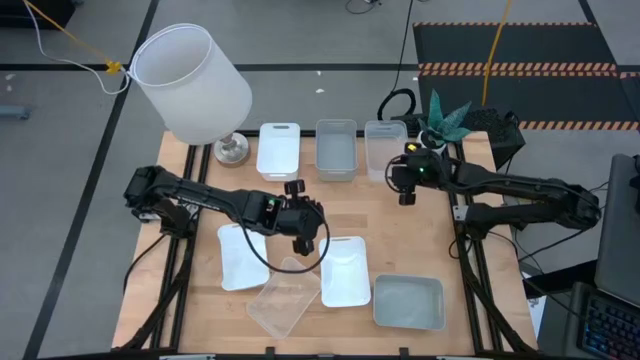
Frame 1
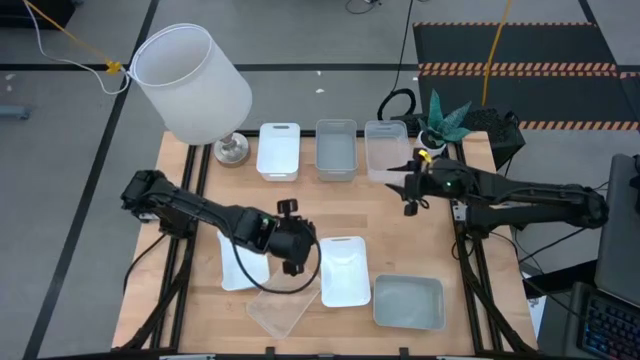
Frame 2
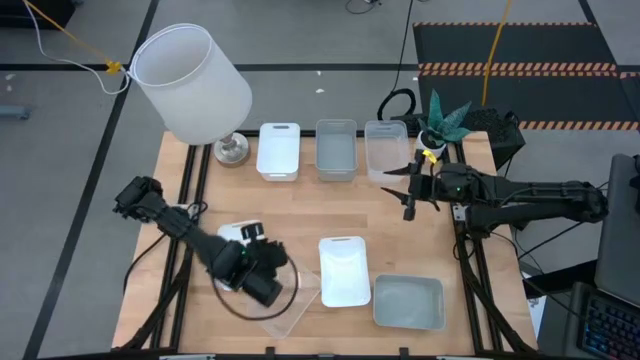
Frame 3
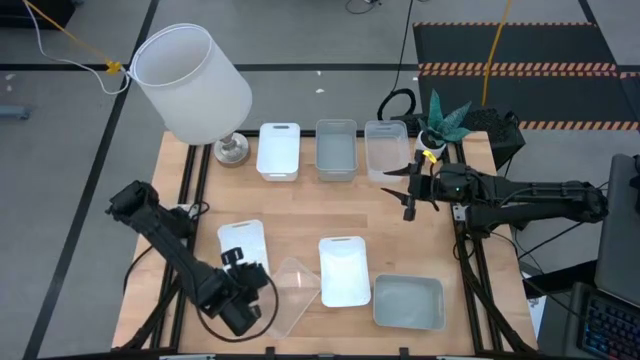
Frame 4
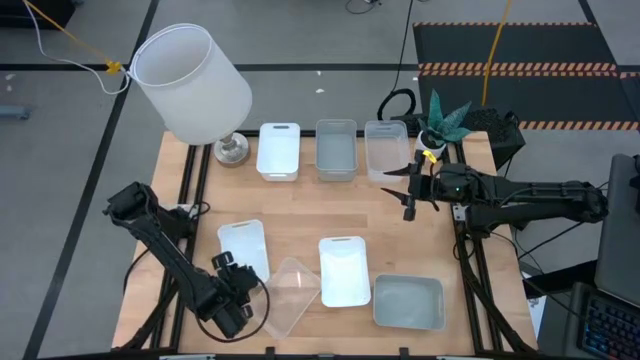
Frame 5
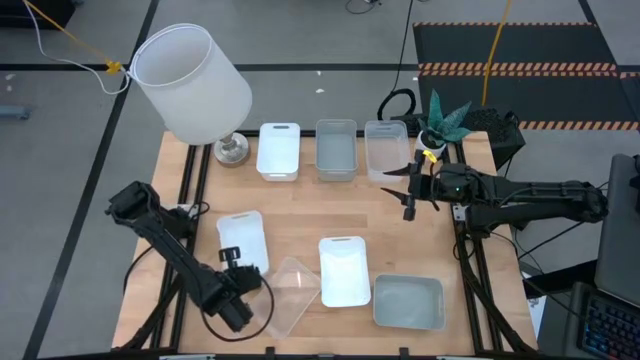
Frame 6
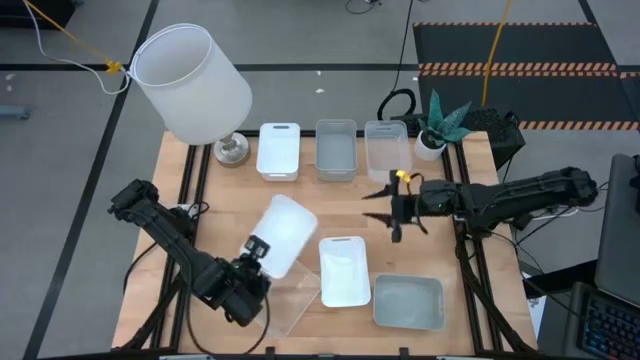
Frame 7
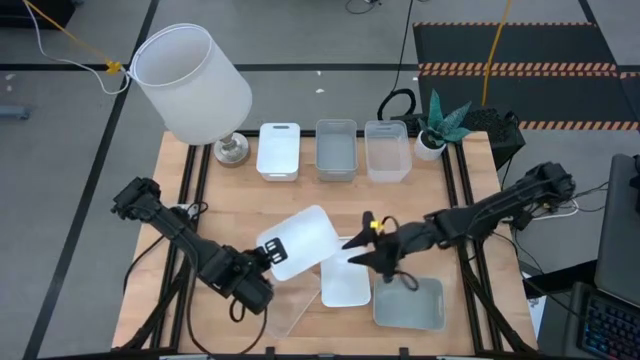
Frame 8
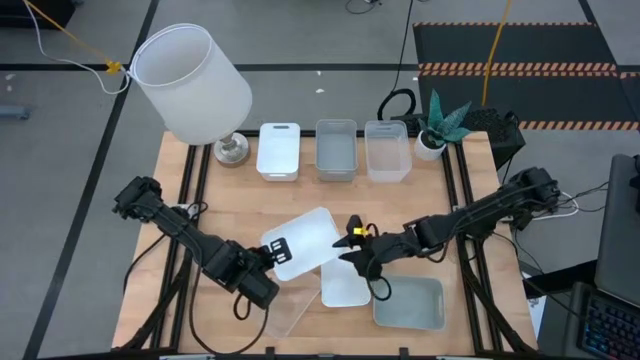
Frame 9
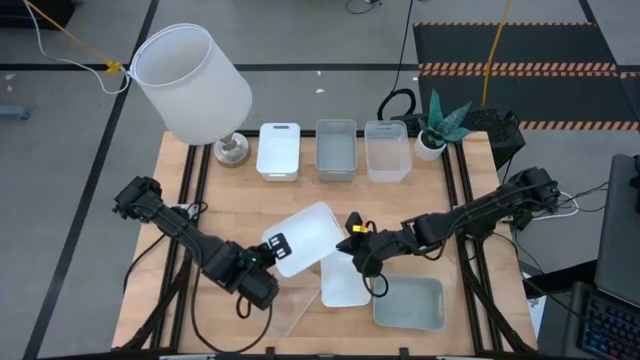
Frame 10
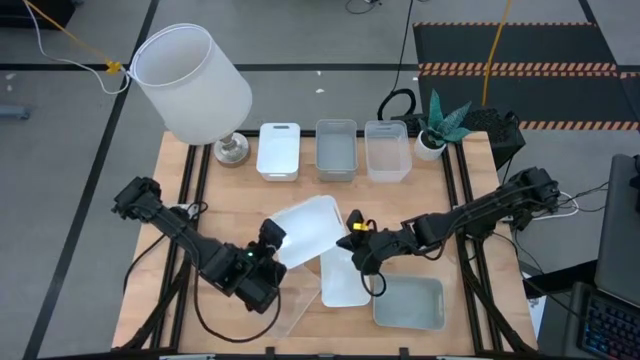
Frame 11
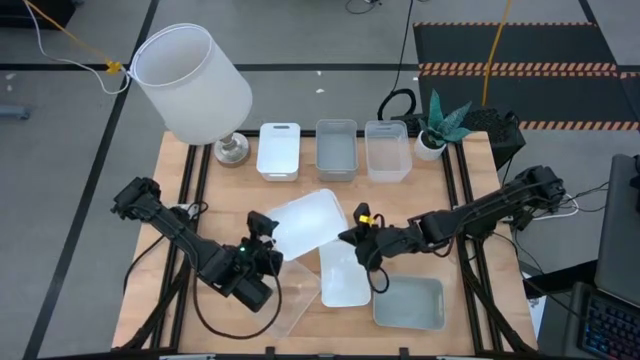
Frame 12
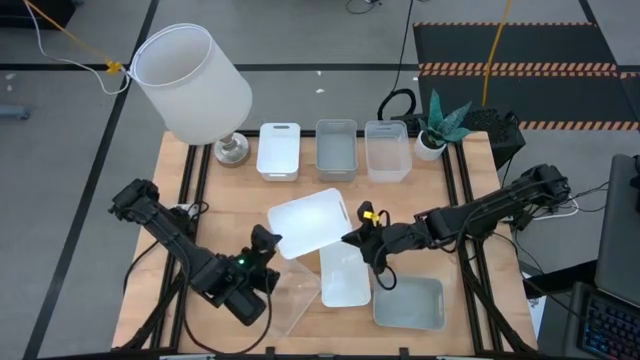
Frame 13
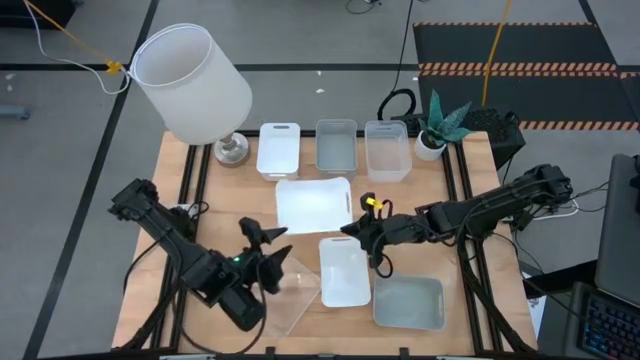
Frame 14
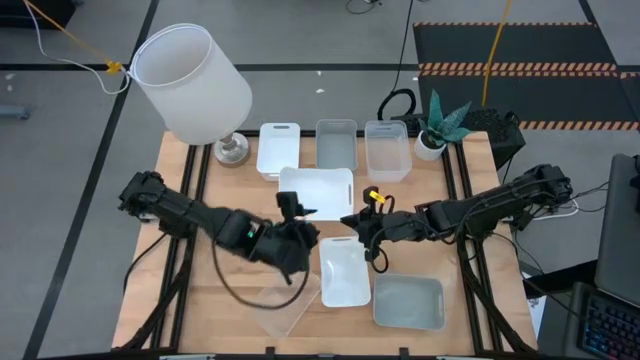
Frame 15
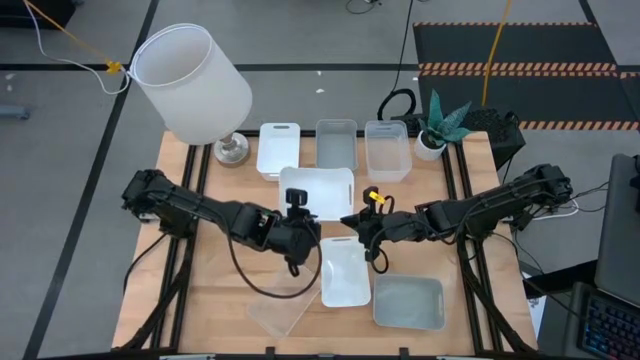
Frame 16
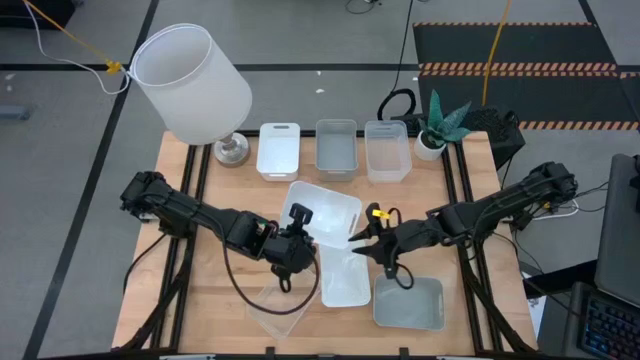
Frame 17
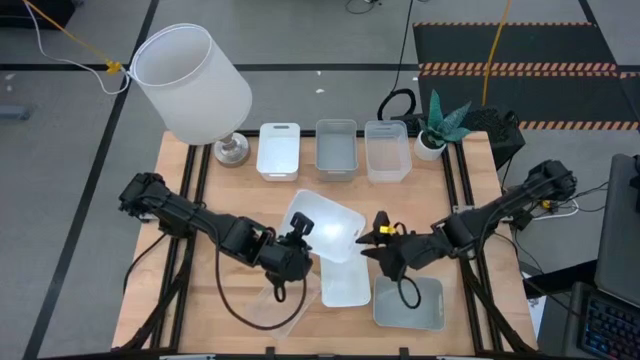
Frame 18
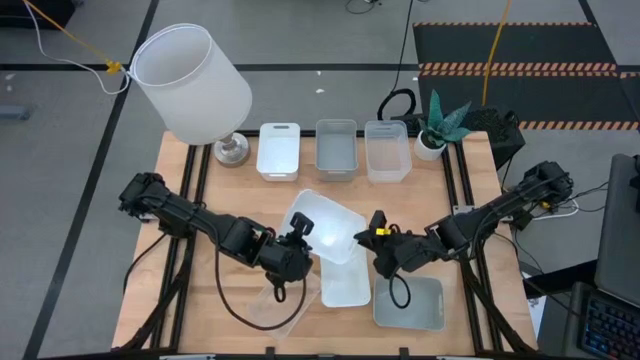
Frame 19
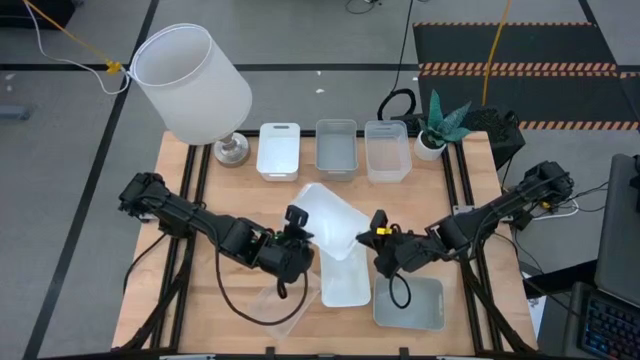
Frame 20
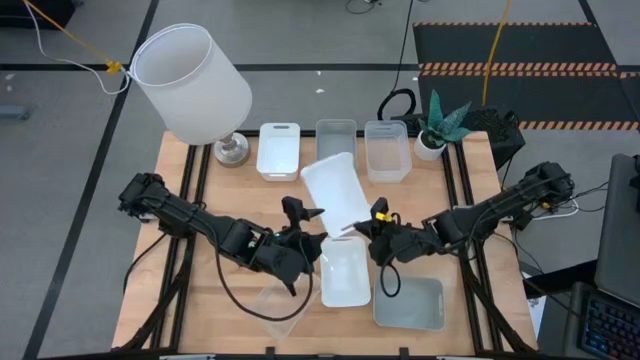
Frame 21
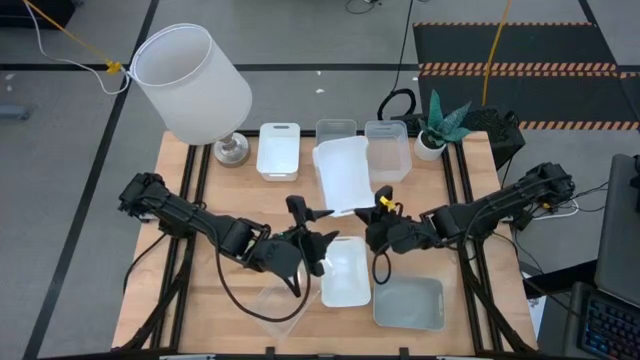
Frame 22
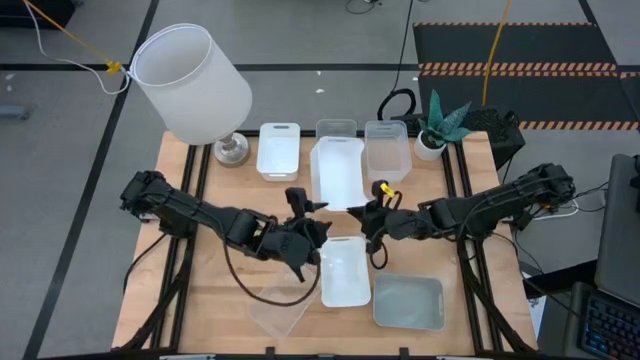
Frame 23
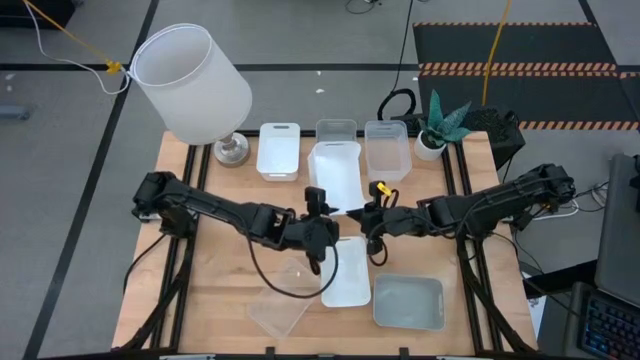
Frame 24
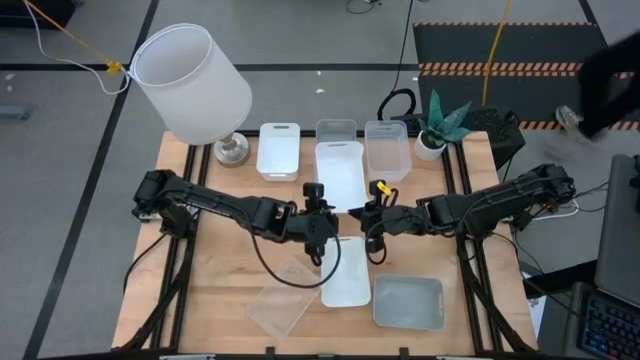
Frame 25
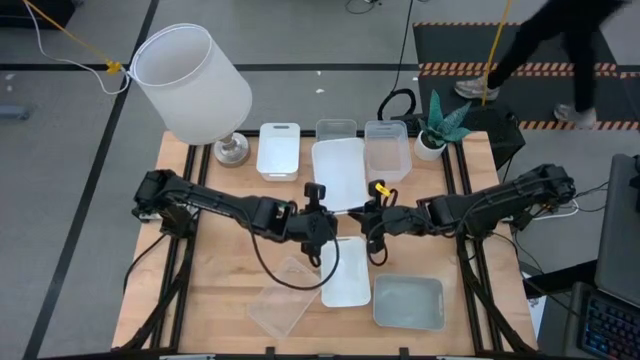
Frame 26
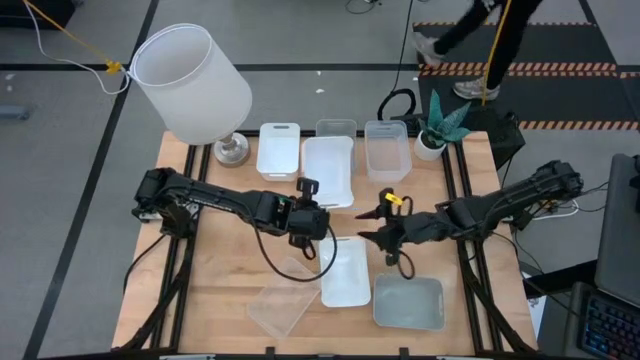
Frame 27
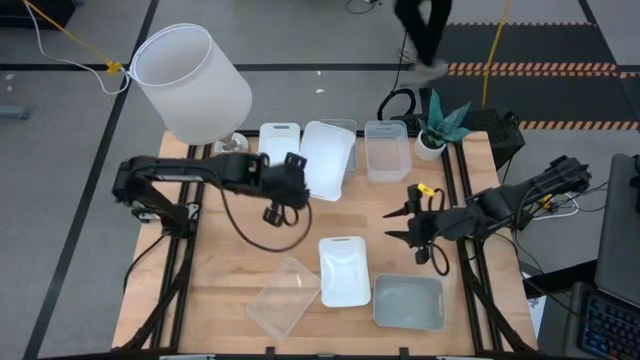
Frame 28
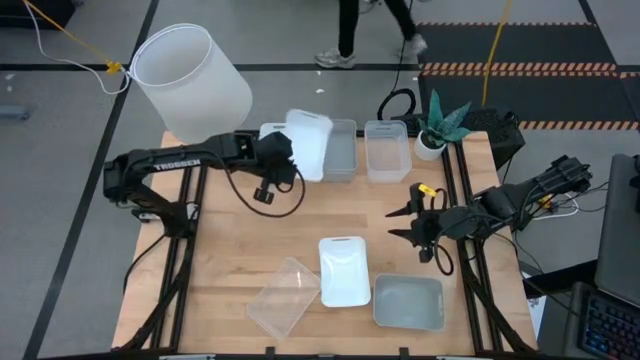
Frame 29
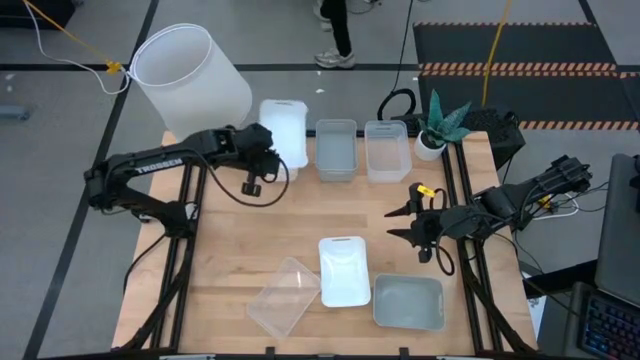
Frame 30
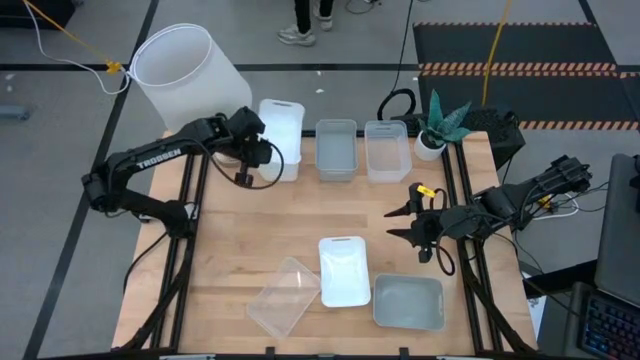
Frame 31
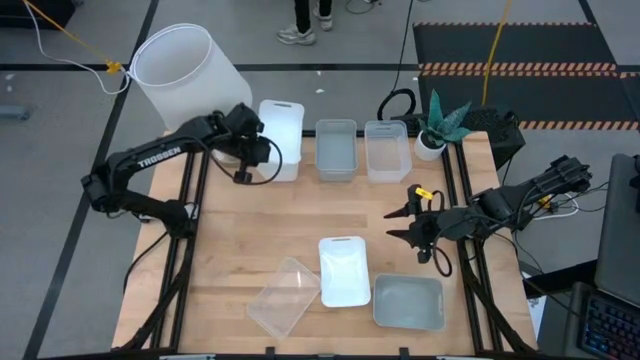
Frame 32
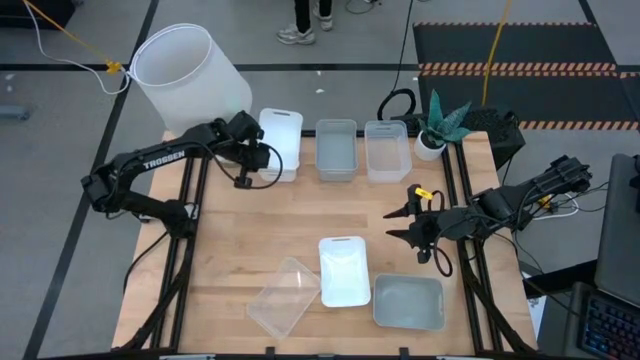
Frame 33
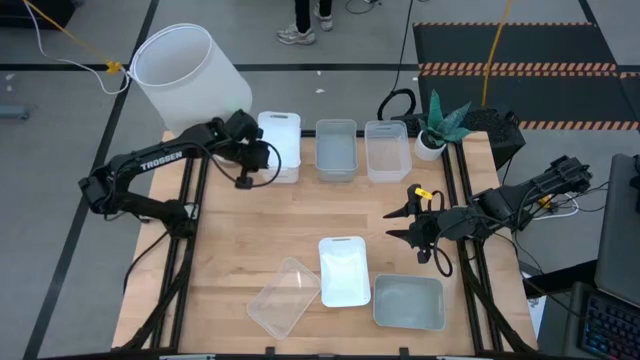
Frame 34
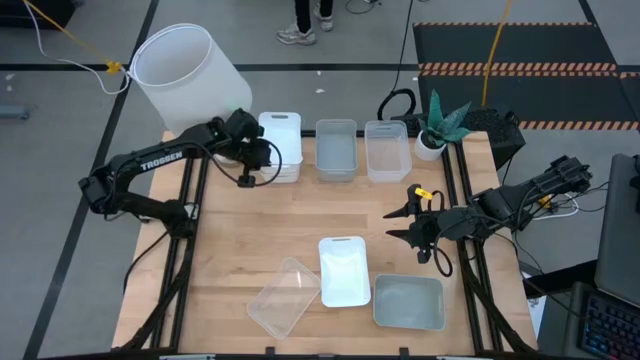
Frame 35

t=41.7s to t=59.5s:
Stack the left white bin on the top left white bin

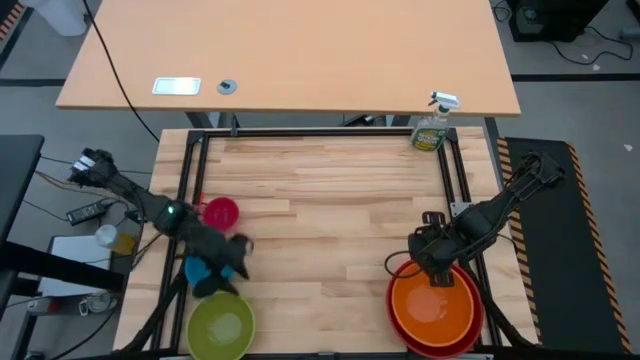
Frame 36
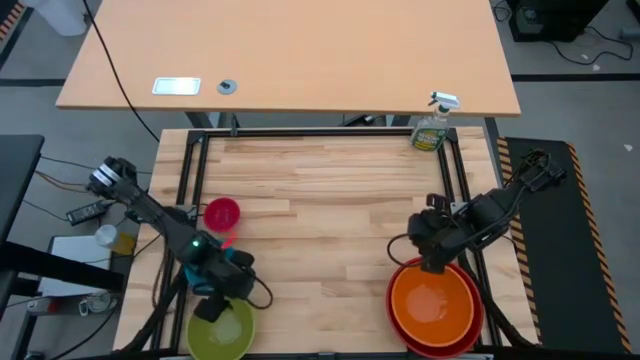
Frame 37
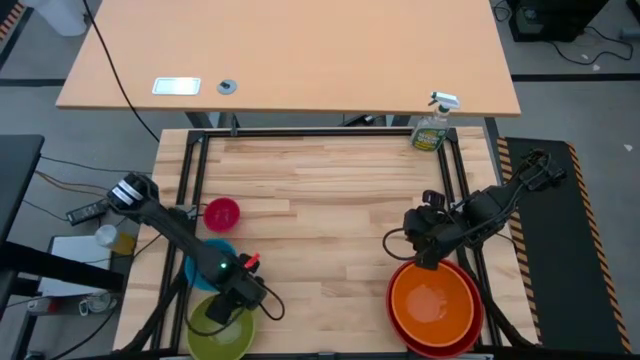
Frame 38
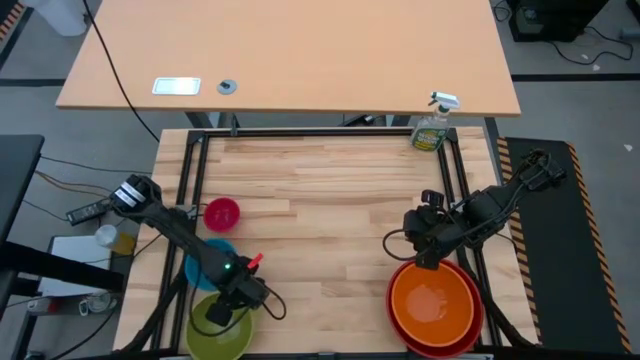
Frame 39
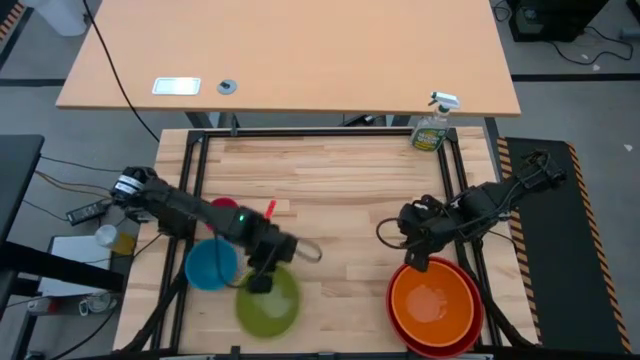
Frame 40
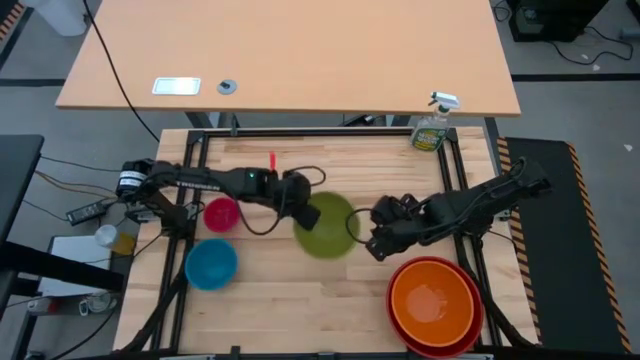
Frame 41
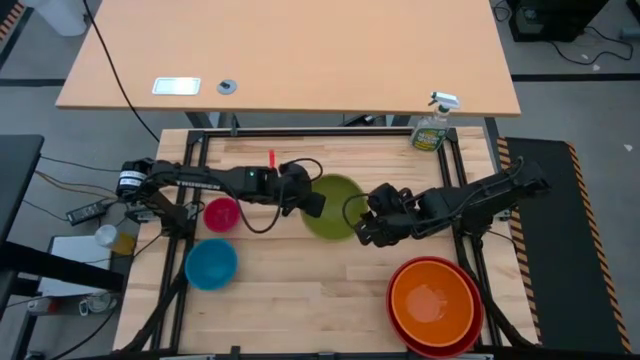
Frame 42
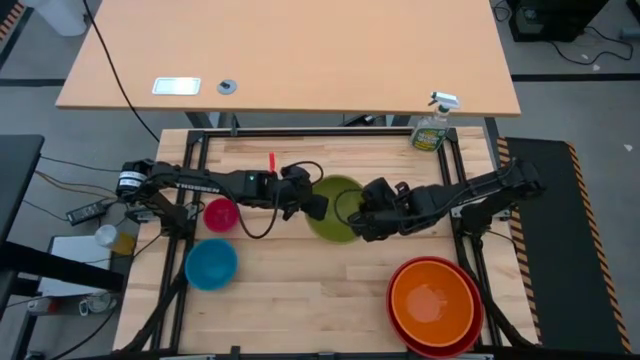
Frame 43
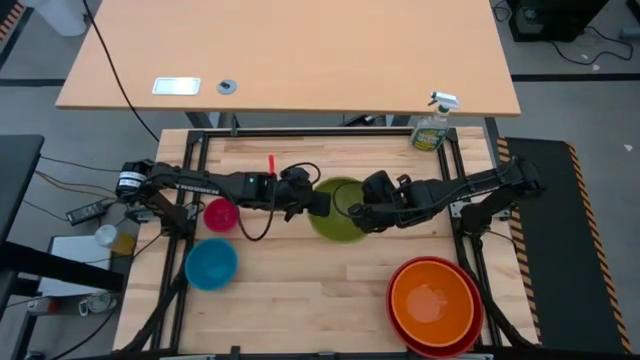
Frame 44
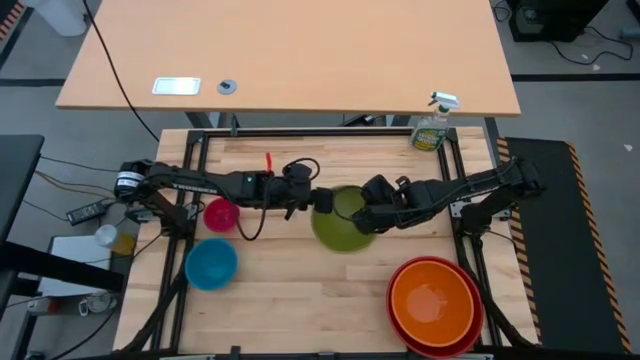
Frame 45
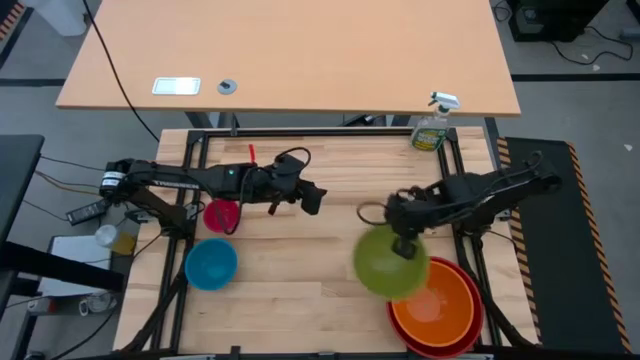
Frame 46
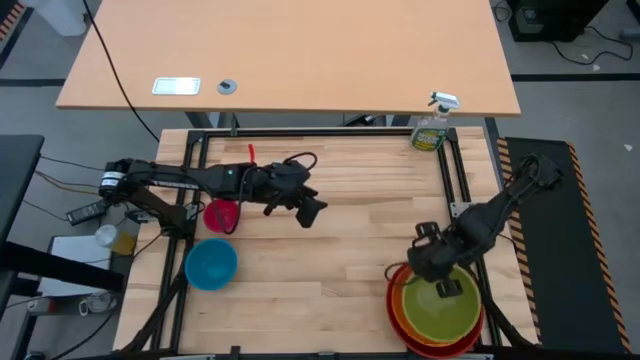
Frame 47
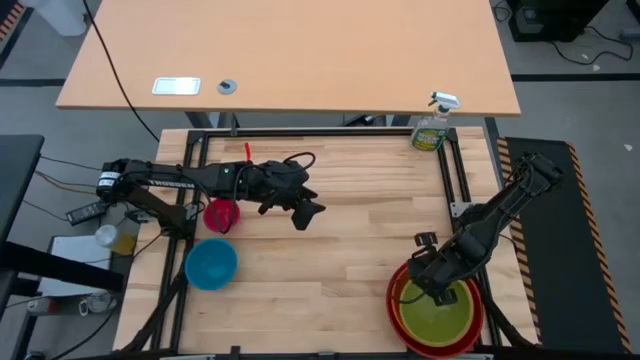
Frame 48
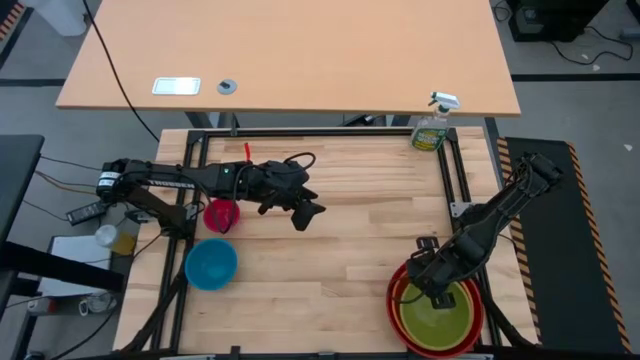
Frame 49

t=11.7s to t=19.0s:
Stack the medium green bowl on top of the large orange bowl
